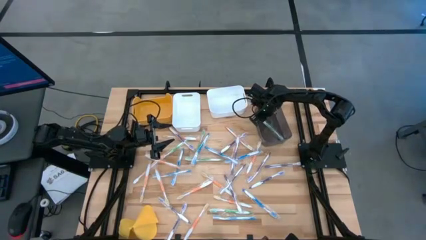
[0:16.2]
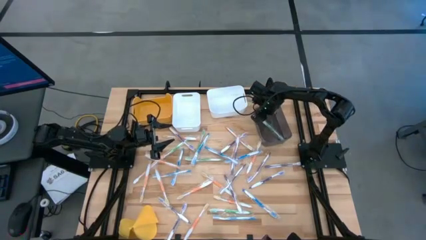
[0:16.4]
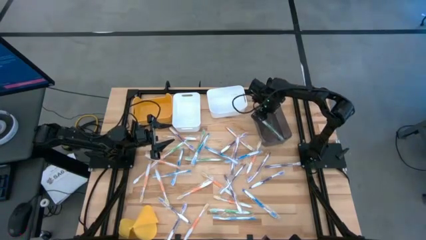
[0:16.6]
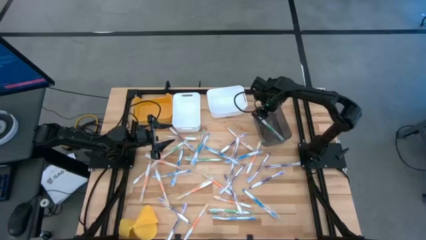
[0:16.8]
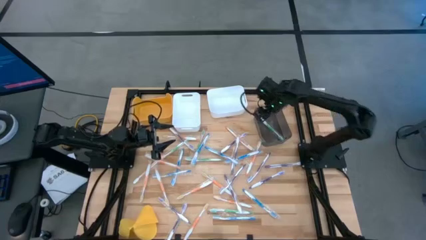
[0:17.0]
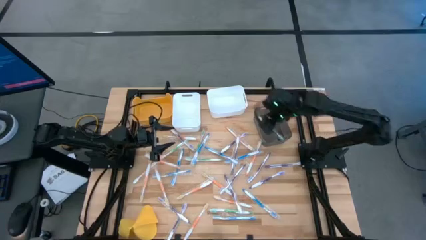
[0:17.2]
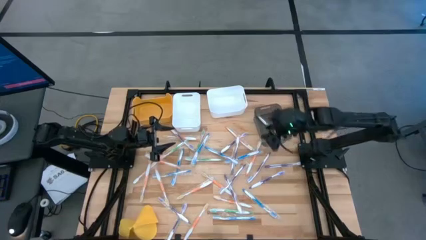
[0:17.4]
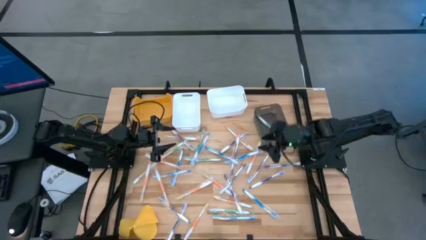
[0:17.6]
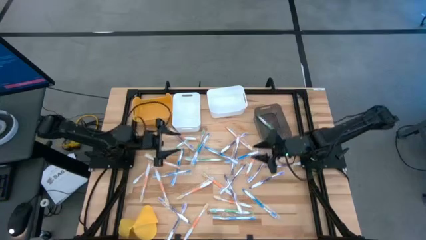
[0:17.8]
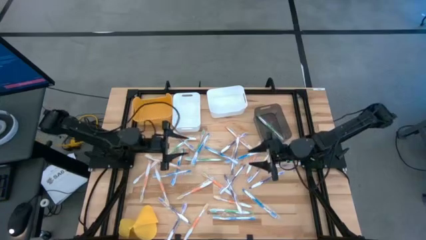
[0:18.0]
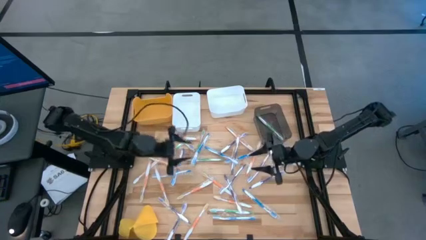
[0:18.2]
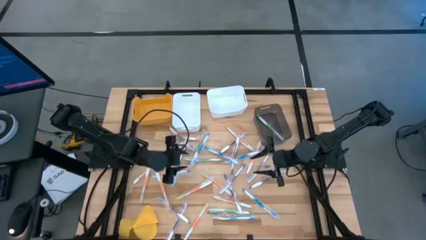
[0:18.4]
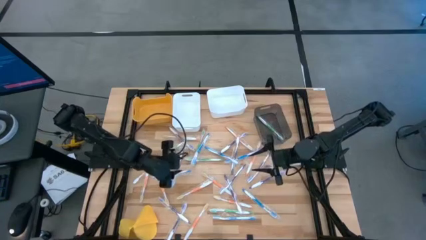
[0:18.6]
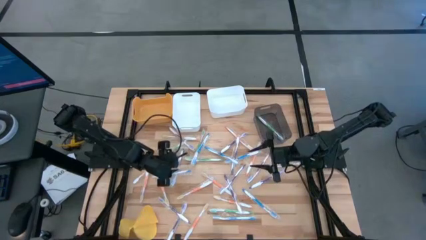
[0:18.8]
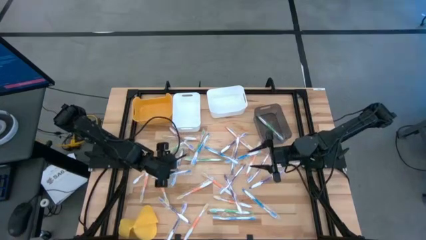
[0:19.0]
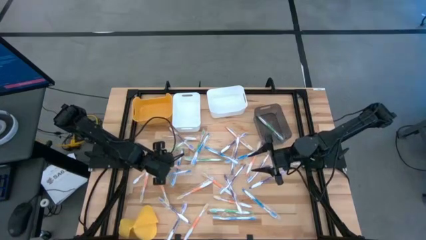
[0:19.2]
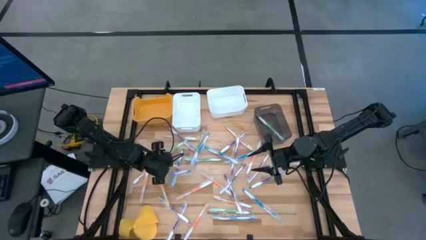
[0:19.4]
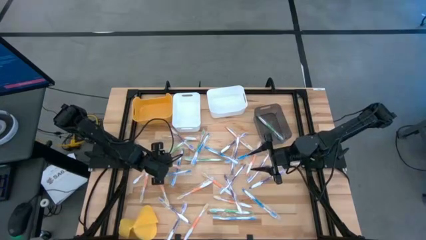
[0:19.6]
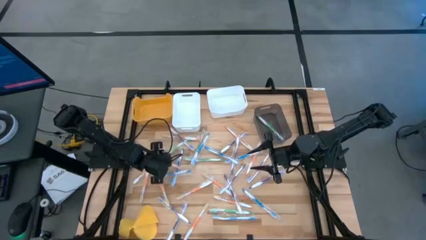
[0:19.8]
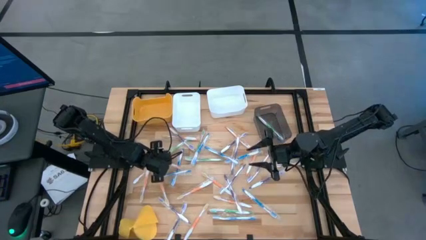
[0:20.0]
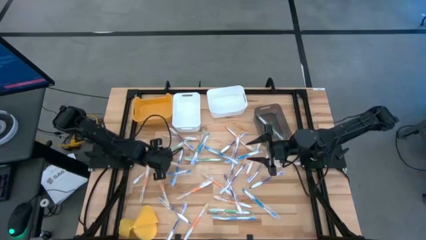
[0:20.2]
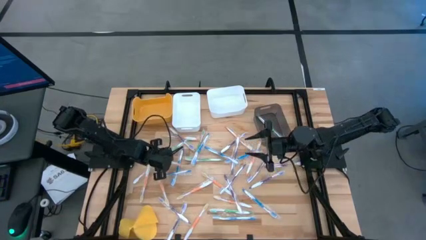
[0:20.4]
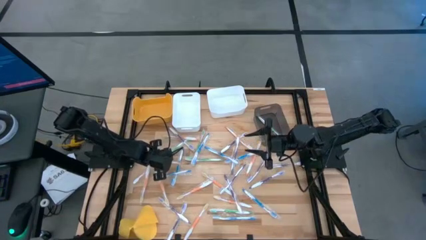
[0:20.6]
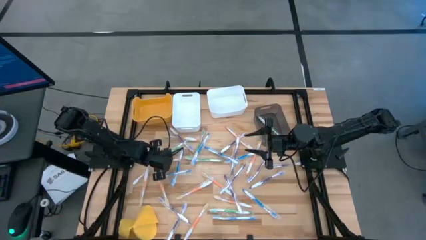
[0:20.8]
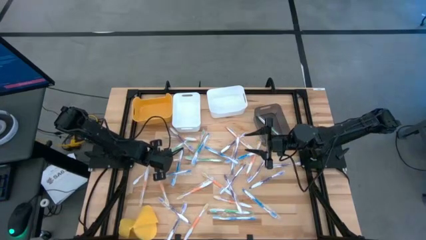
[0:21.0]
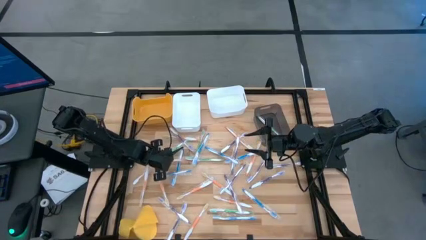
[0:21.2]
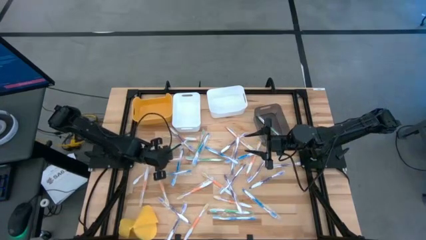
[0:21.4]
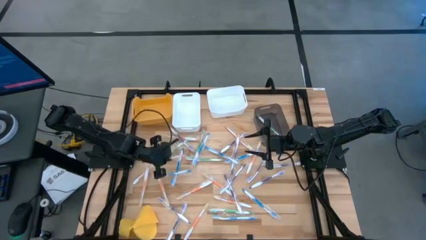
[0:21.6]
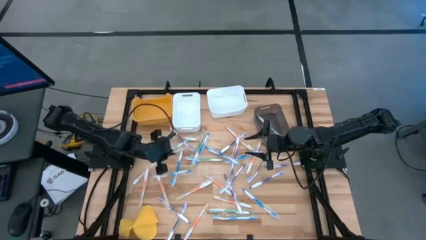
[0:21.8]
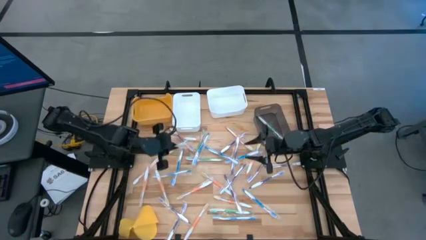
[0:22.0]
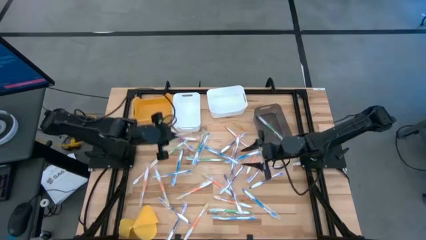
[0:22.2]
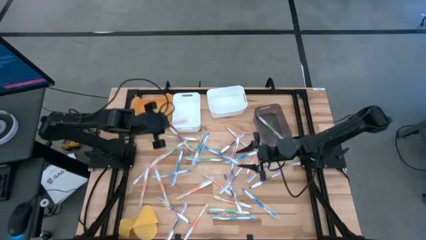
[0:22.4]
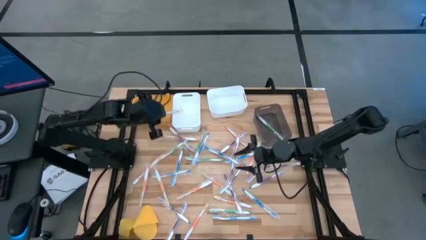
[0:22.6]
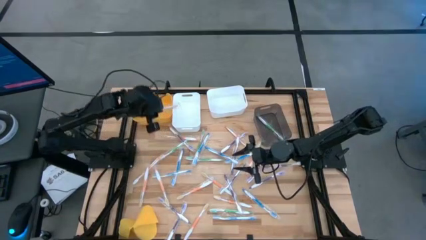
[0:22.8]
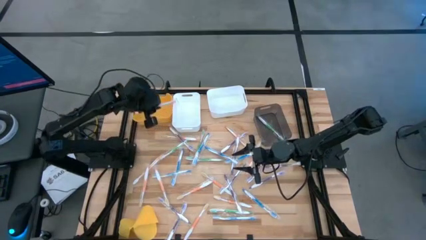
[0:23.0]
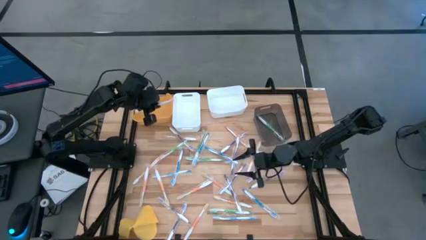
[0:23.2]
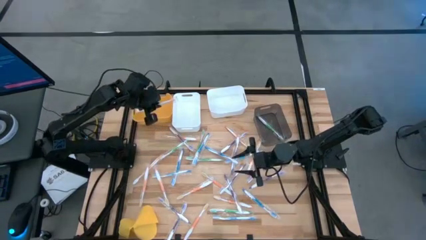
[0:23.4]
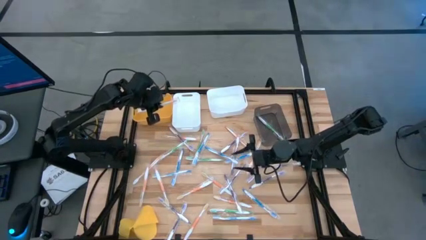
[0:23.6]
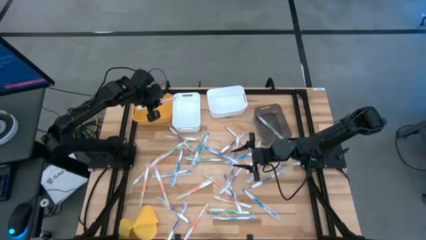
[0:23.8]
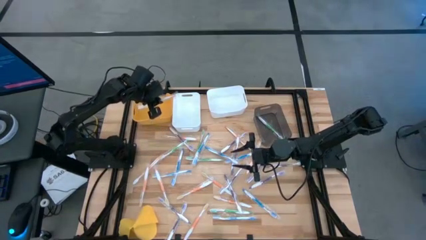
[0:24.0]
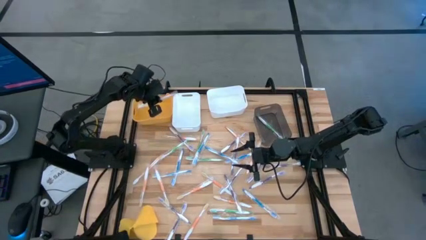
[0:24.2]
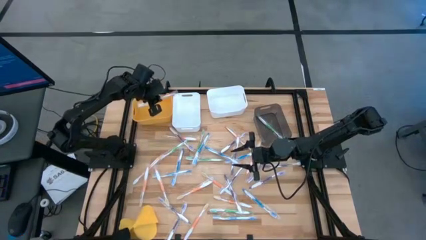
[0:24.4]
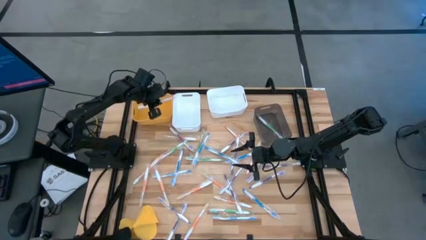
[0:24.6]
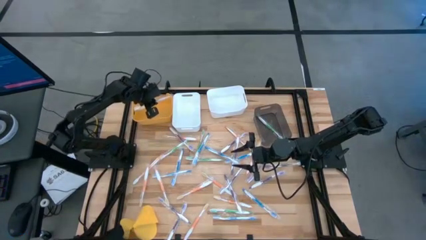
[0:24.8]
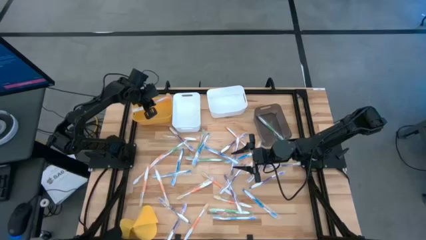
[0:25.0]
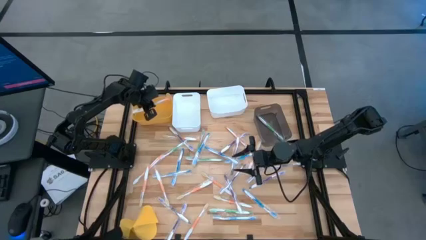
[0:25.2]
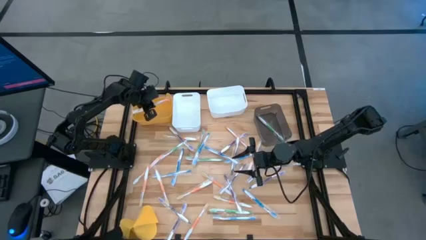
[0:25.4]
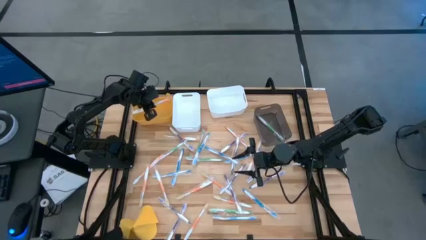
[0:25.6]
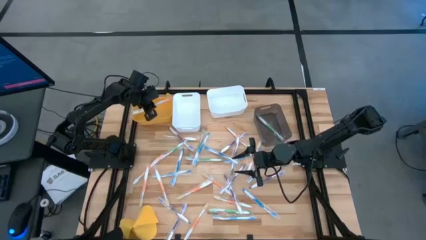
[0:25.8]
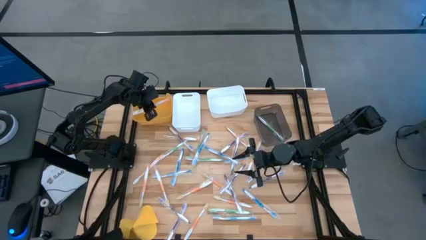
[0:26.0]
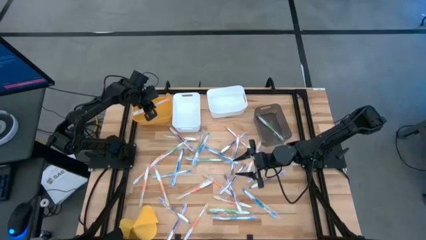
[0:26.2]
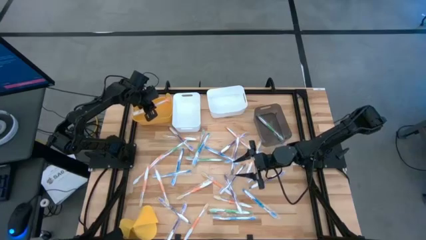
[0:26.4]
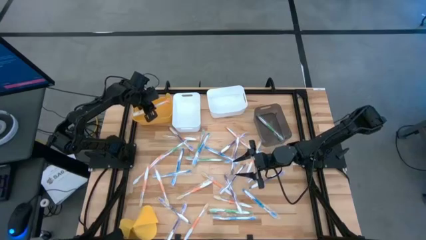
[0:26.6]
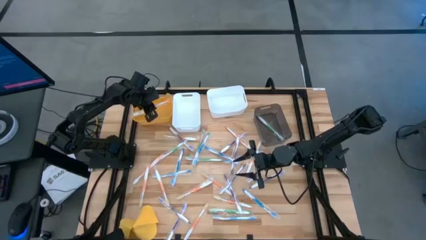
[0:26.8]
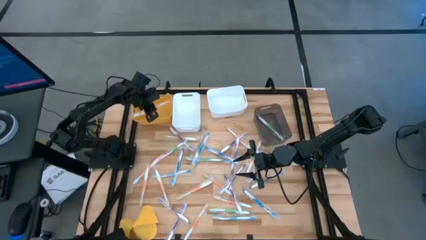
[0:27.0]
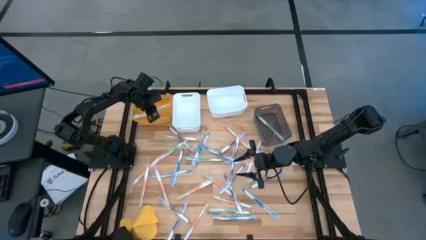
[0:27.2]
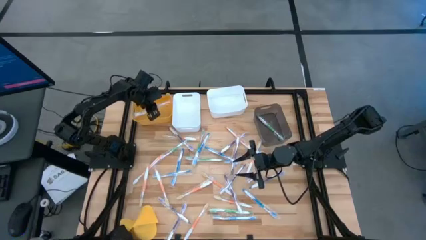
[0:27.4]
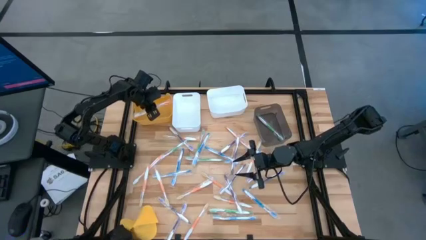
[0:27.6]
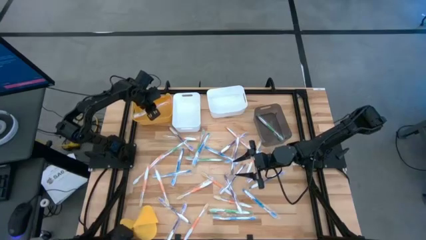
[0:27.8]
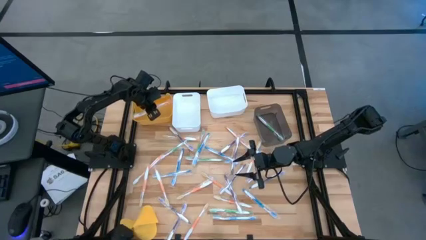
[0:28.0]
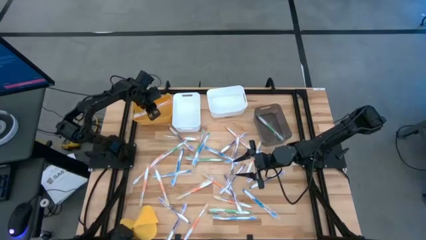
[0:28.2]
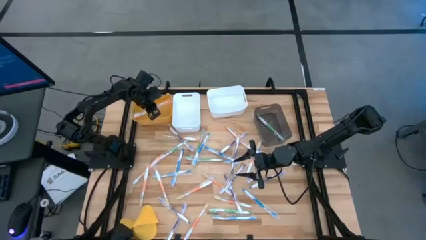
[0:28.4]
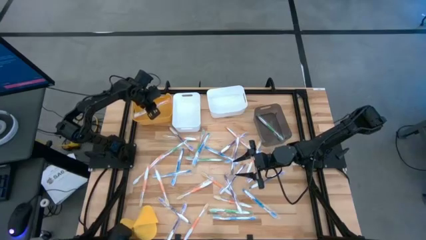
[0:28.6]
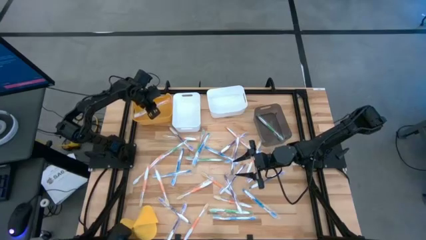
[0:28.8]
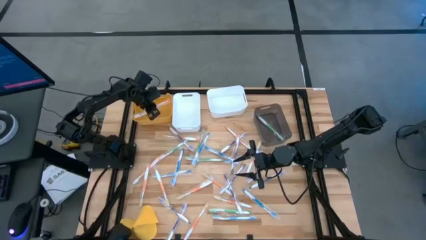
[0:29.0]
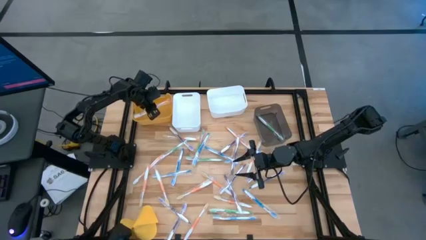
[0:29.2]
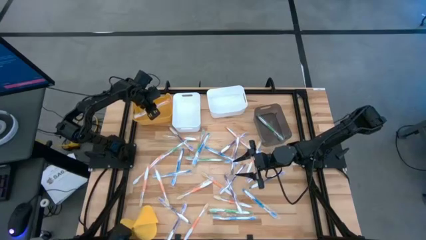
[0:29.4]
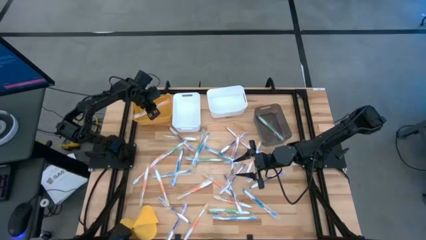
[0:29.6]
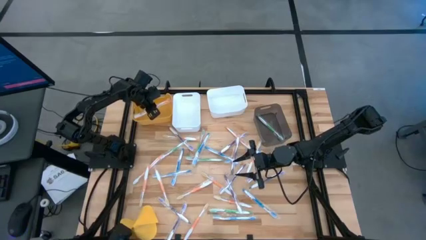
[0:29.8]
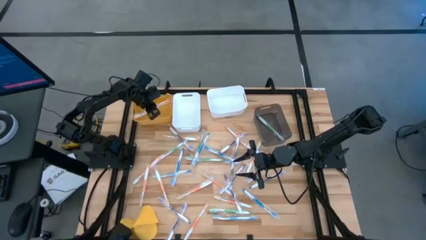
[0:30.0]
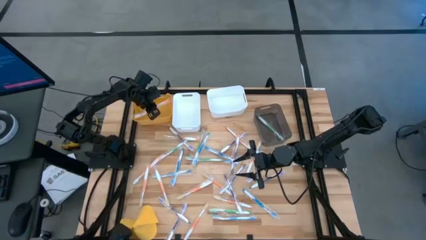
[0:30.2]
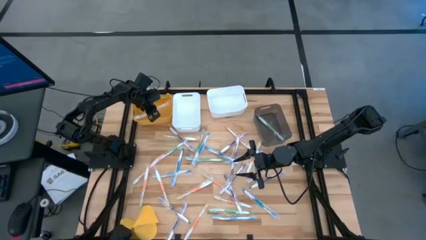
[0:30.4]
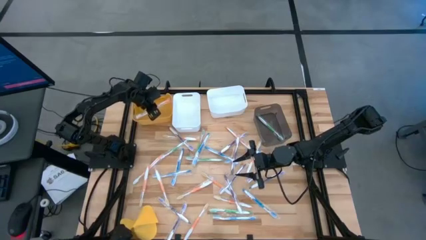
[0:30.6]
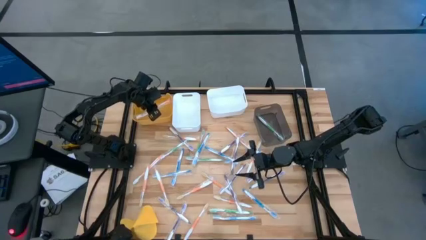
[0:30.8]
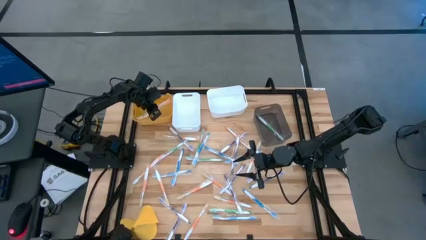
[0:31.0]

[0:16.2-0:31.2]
Task: Pick & Place Toothbrushes
Put the orange toothbrush into the yellow bin
